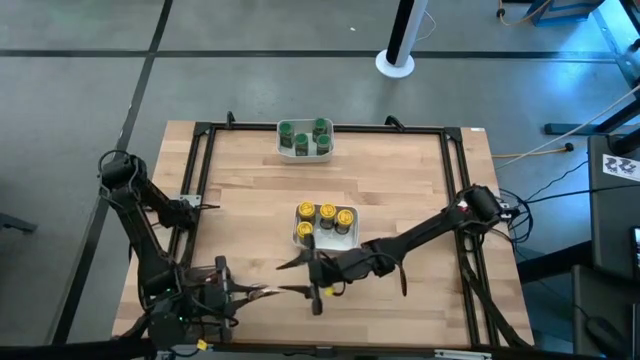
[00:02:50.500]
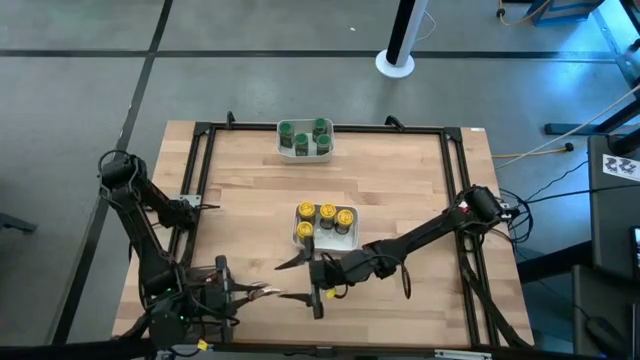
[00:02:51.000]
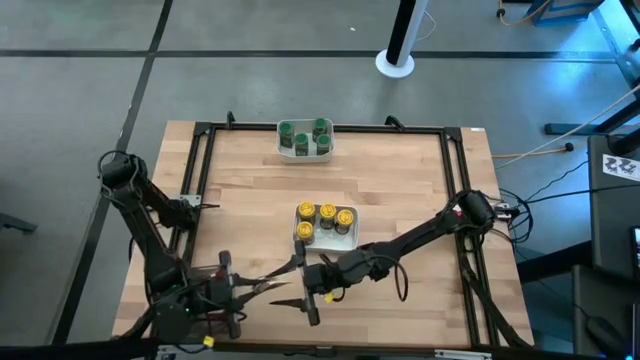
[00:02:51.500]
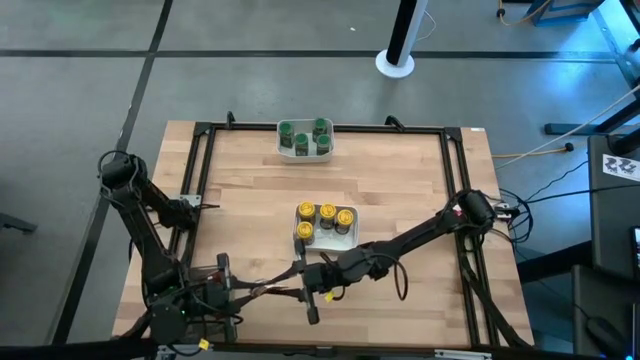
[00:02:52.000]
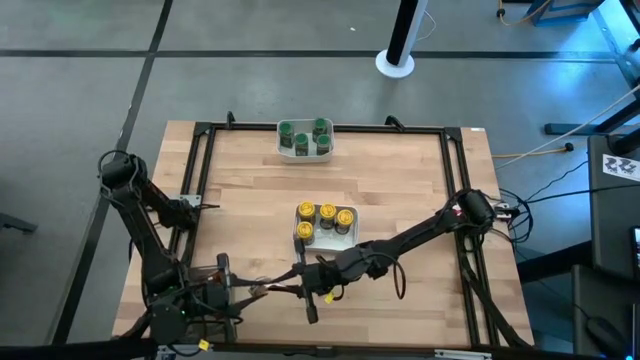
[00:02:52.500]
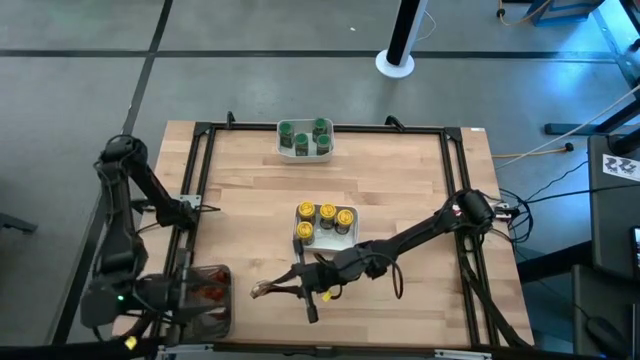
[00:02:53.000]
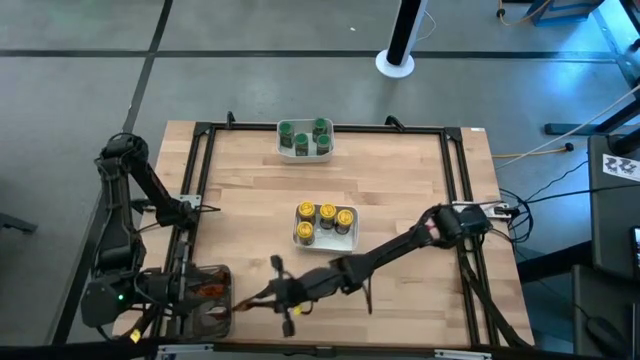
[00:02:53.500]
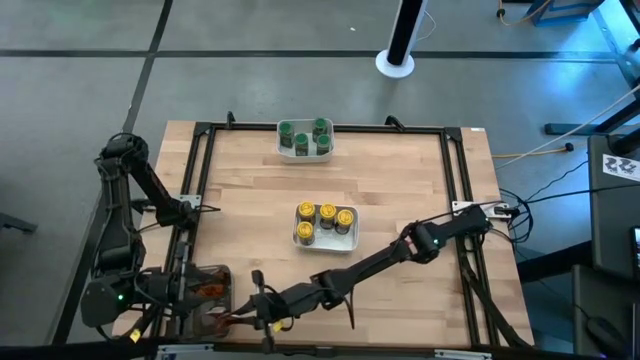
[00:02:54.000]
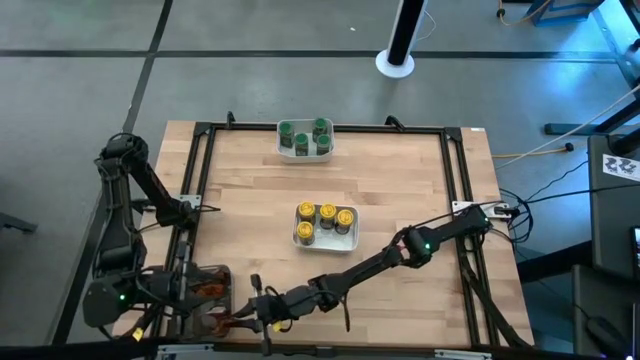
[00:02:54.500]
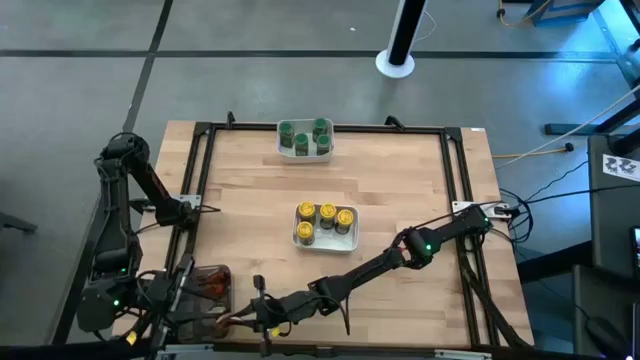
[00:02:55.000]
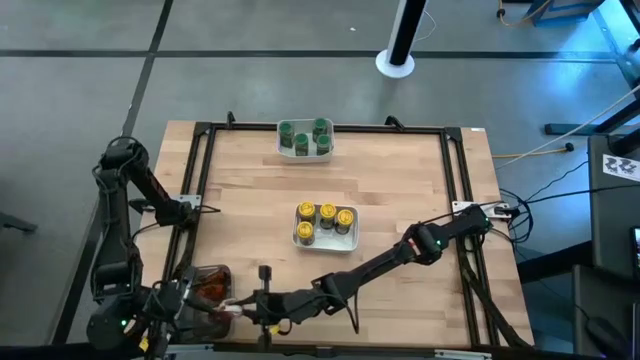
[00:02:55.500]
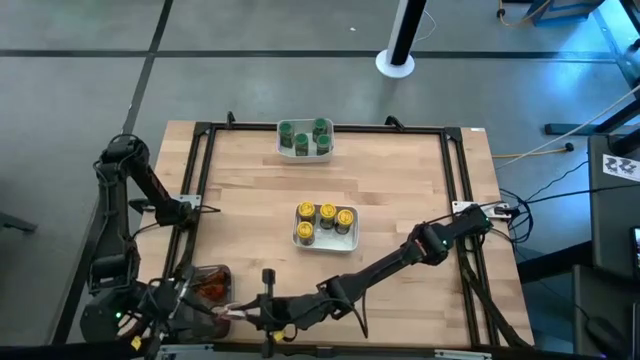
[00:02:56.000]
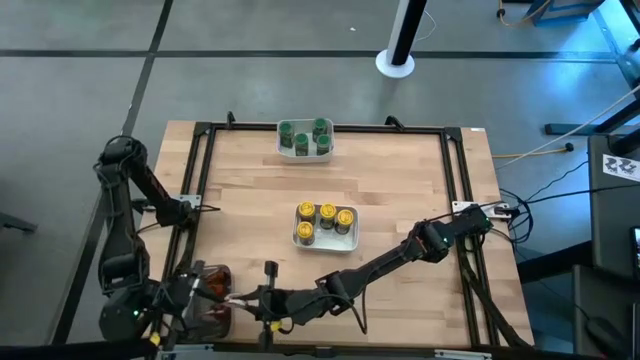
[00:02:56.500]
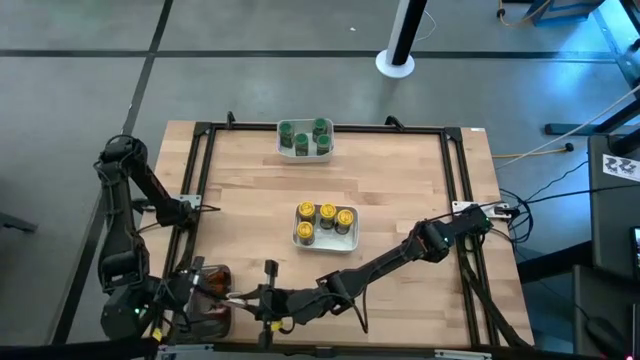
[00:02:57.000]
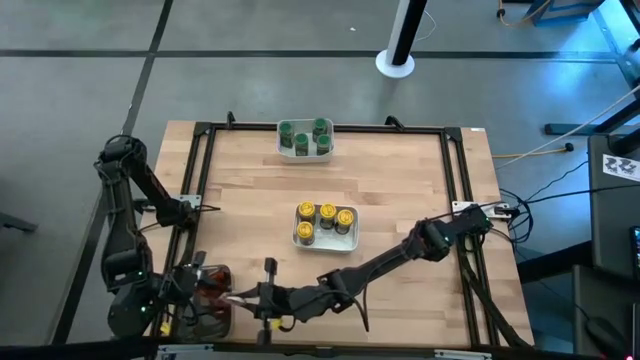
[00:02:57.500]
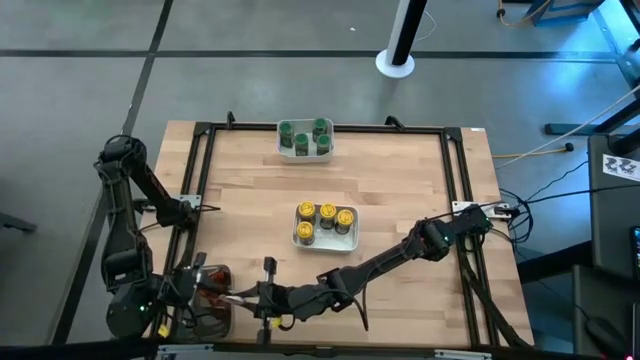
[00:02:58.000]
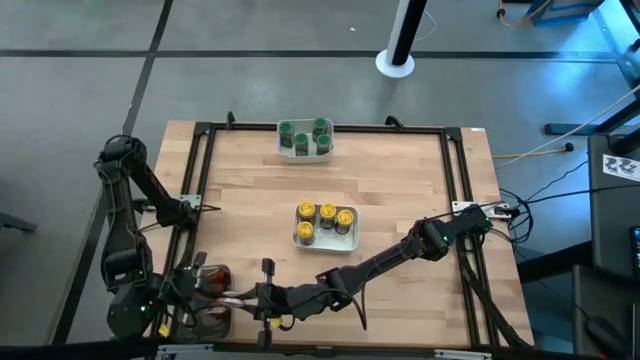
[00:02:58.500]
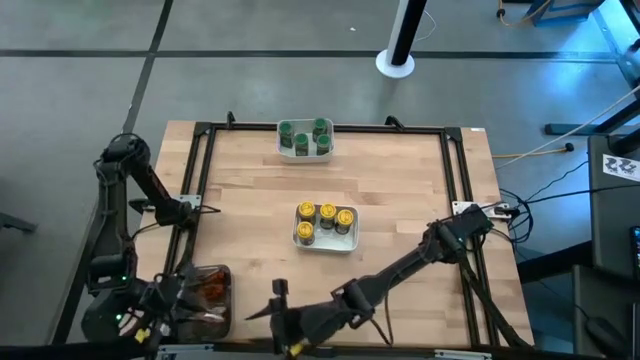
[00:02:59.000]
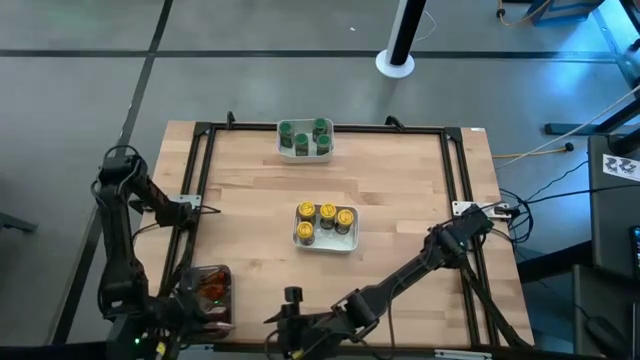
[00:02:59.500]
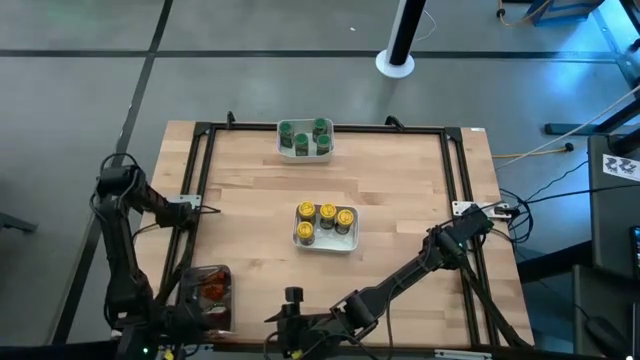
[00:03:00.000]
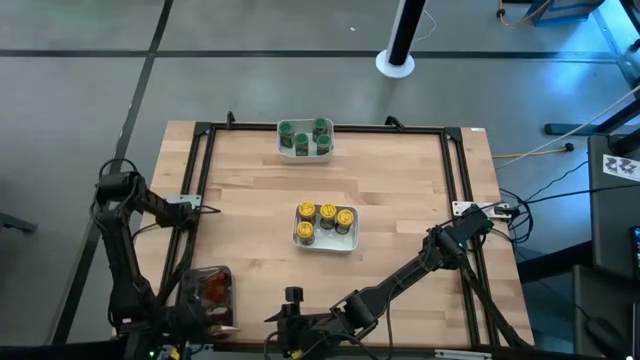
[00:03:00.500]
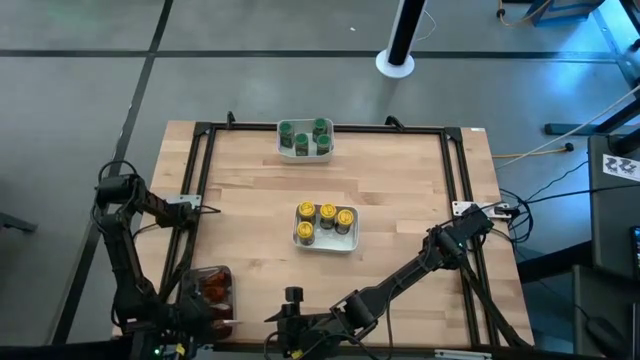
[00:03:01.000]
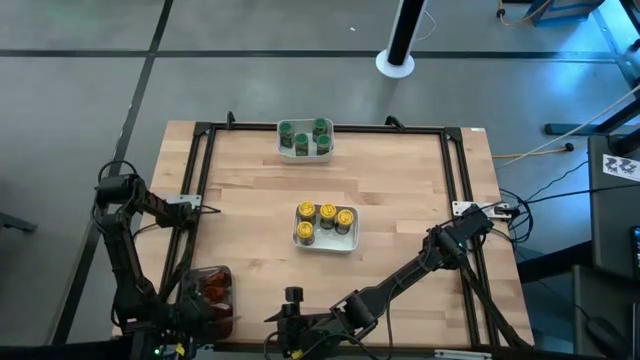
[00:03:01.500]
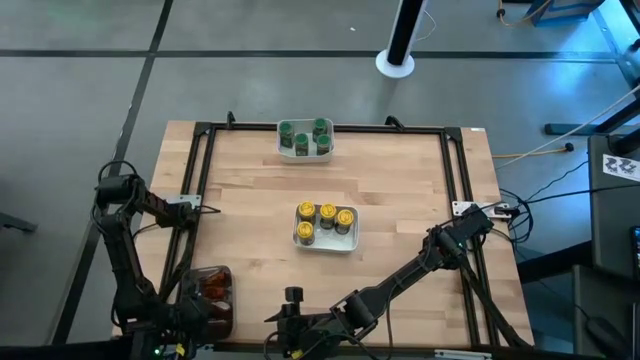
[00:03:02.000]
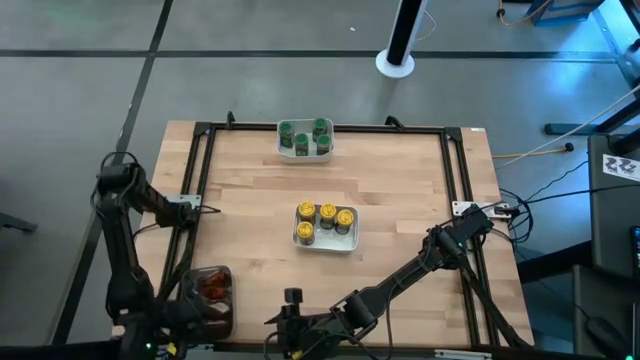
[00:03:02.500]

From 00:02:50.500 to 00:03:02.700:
Task: Sort spices by type
Put the top orange seasoning pack into the black bin

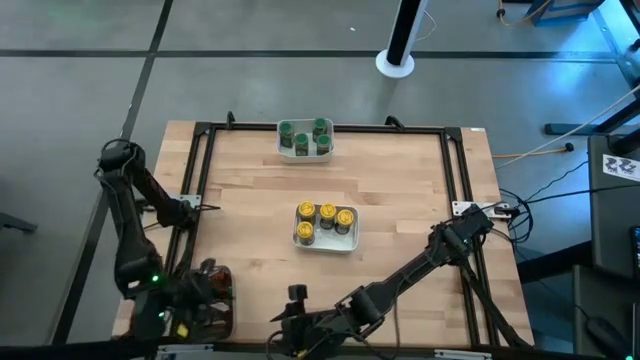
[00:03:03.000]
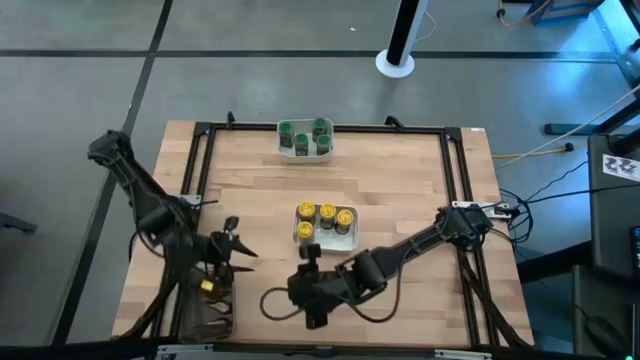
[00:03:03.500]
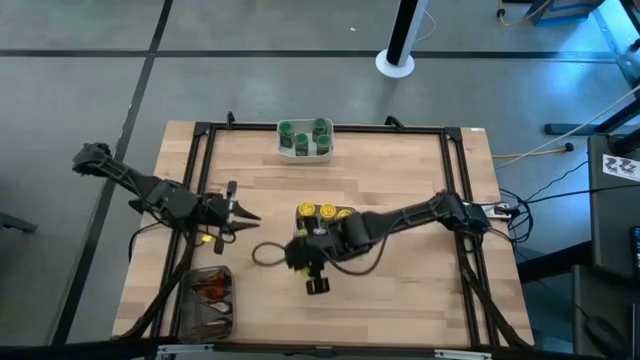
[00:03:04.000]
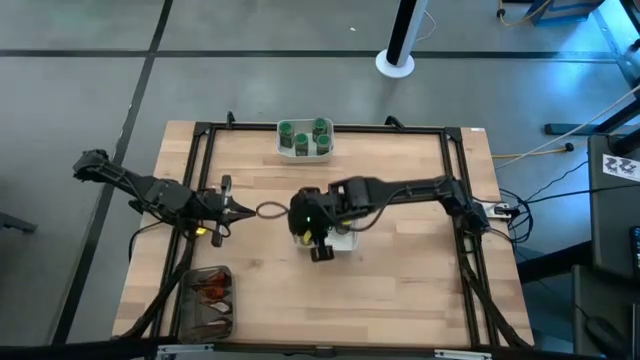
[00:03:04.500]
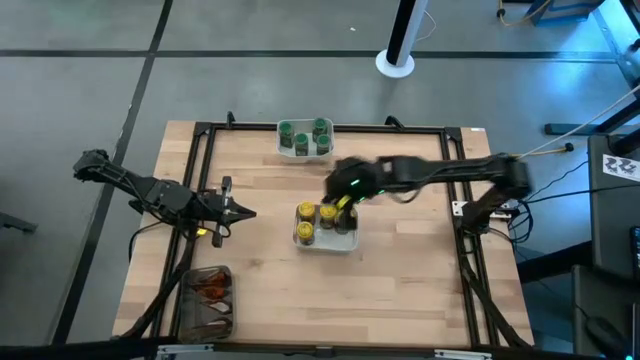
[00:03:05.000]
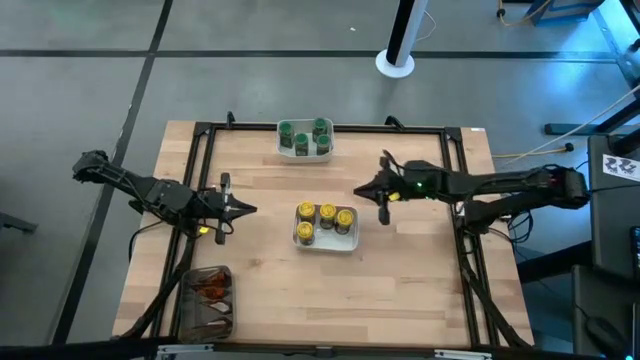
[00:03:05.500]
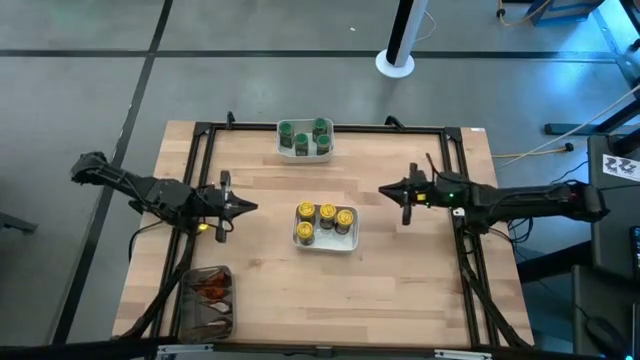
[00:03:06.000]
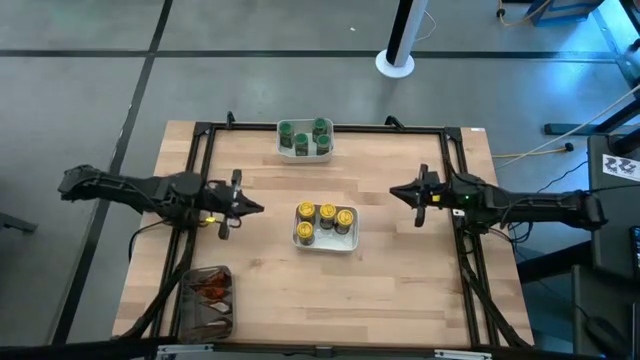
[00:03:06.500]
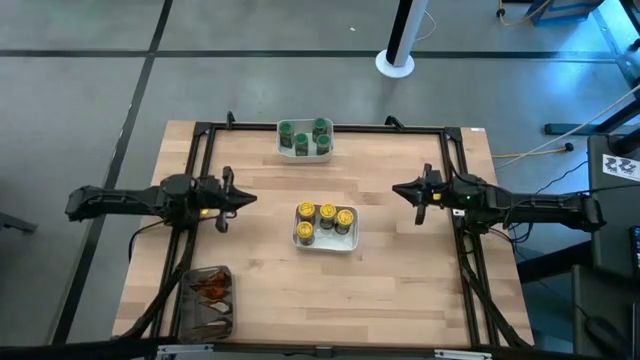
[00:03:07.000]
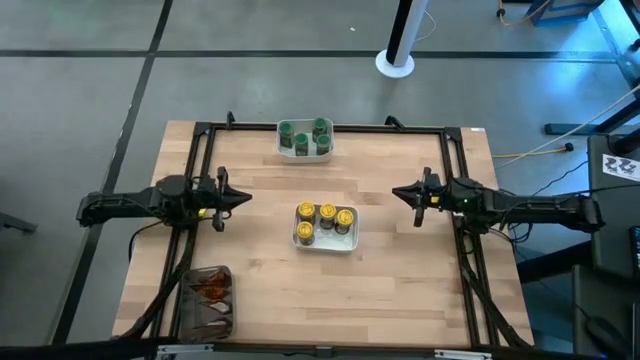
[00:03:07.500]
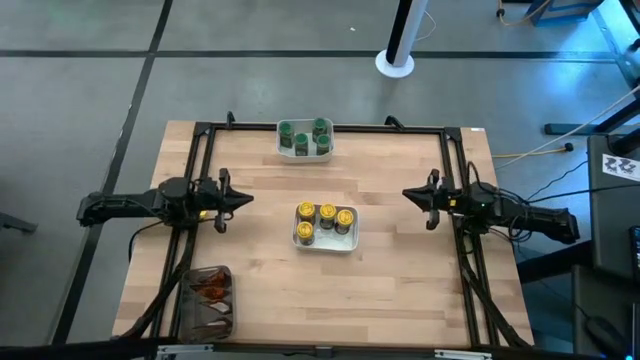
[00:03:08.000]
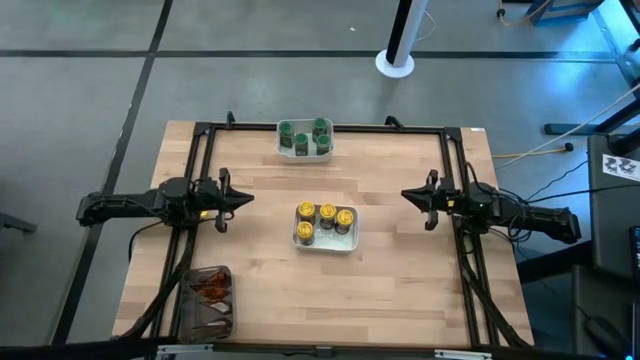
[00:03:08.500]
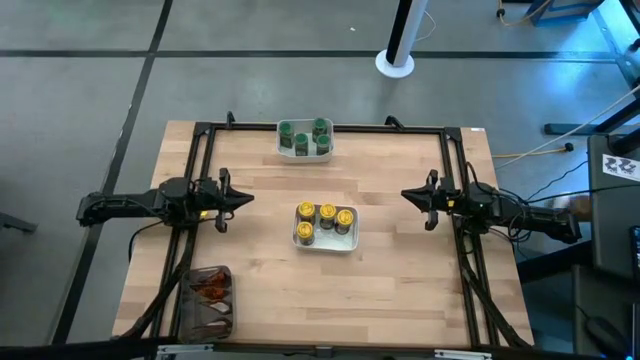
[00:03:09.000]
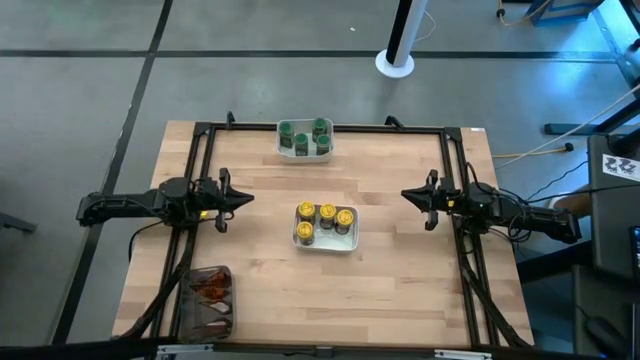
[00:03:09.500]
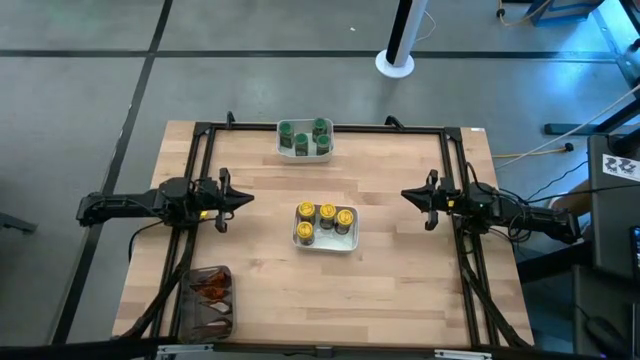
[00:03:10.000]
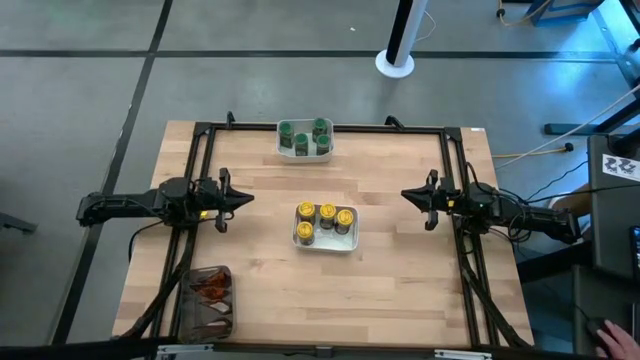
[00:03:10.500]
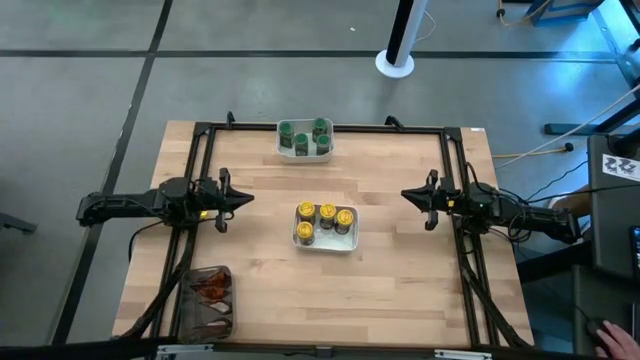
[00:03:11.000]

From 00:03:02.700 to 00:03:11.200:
Return to home position
